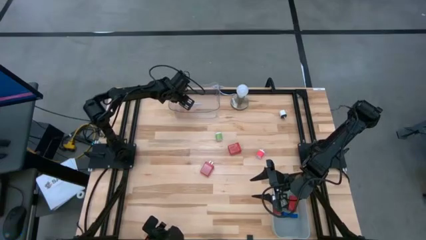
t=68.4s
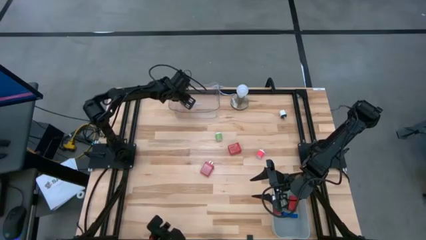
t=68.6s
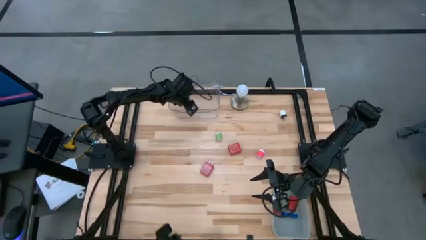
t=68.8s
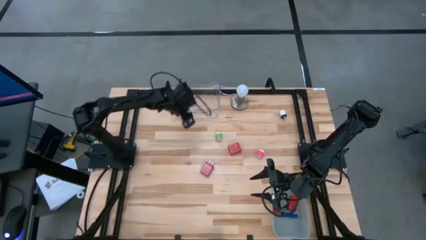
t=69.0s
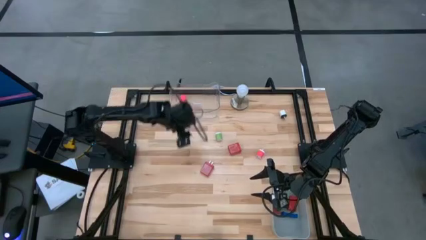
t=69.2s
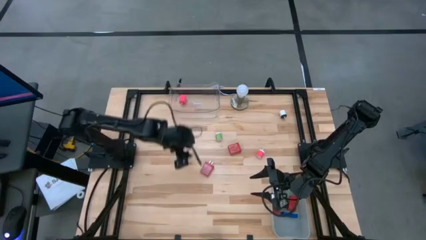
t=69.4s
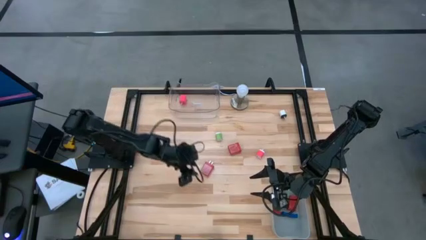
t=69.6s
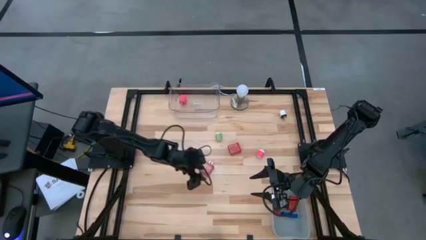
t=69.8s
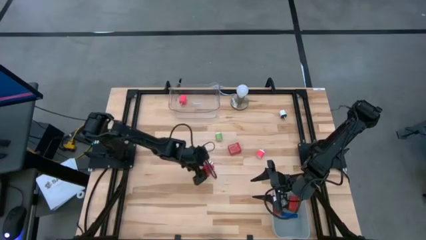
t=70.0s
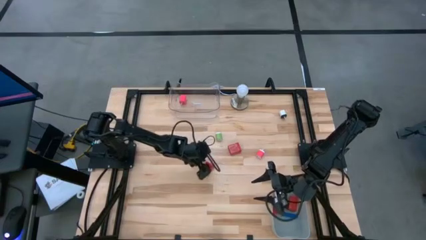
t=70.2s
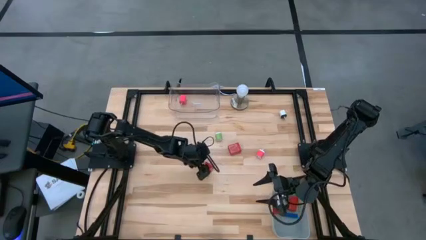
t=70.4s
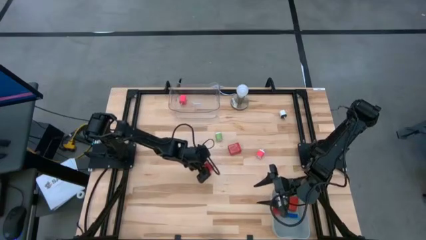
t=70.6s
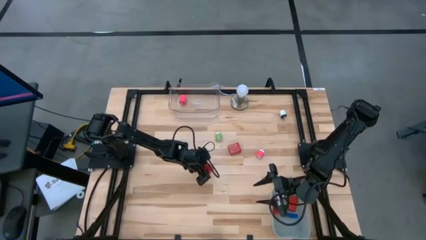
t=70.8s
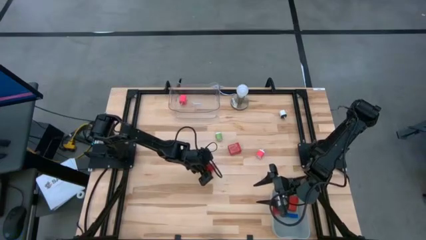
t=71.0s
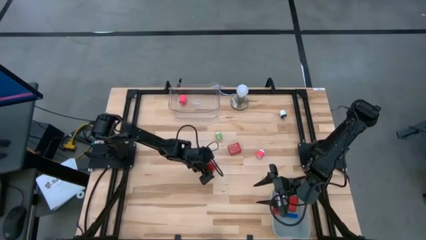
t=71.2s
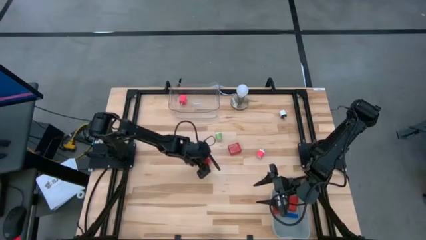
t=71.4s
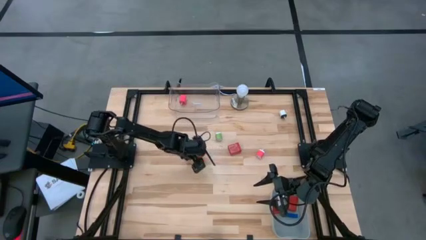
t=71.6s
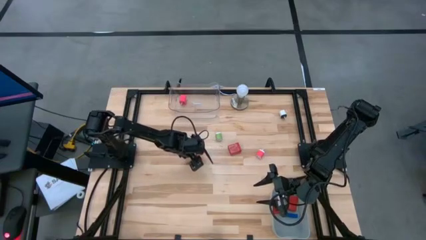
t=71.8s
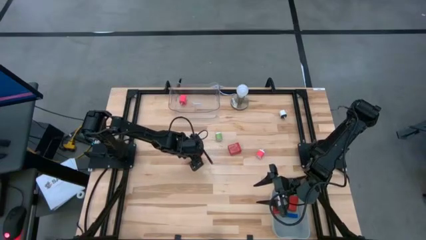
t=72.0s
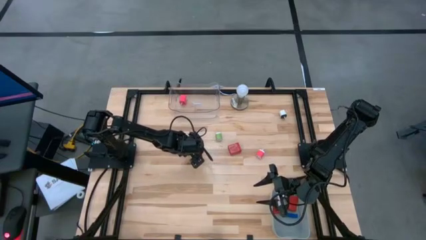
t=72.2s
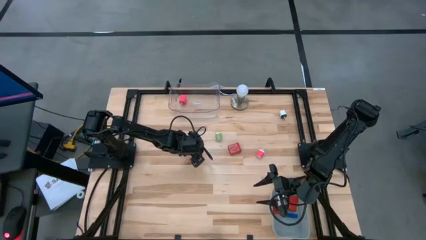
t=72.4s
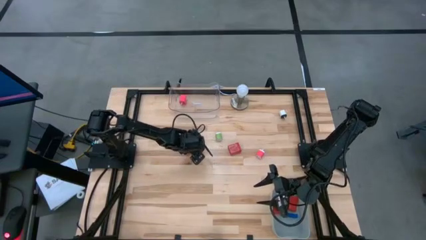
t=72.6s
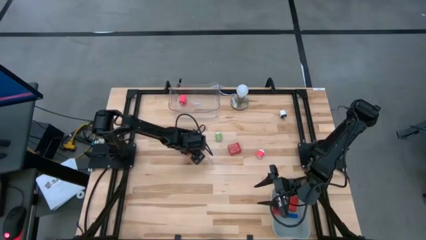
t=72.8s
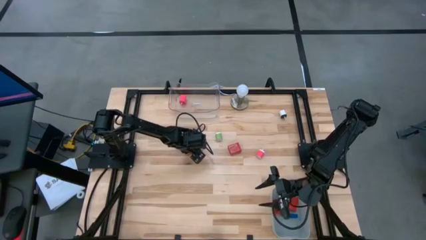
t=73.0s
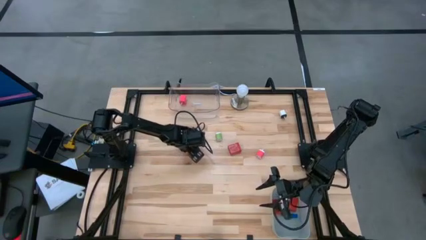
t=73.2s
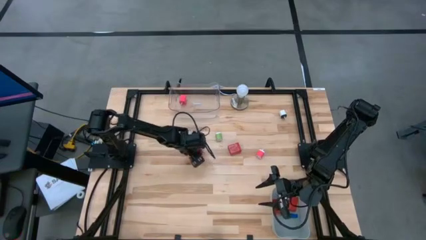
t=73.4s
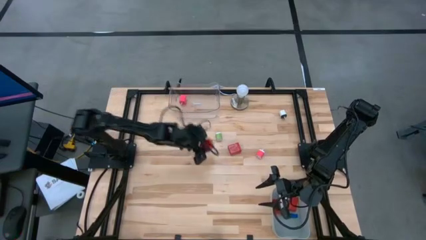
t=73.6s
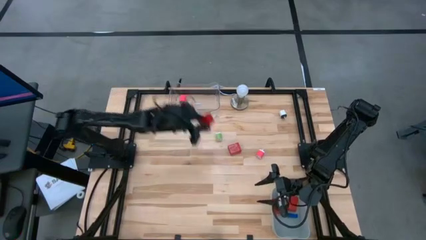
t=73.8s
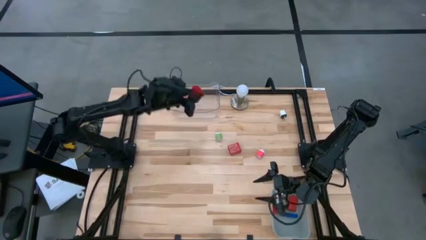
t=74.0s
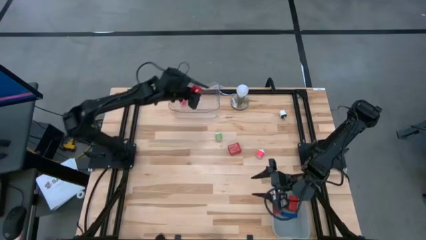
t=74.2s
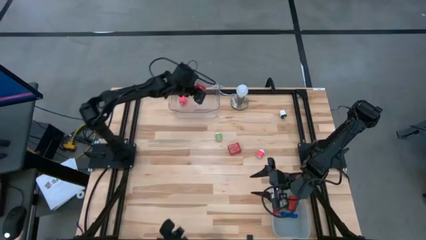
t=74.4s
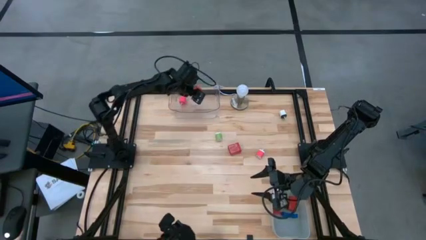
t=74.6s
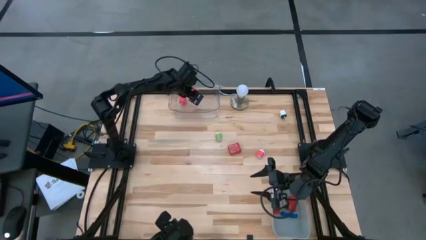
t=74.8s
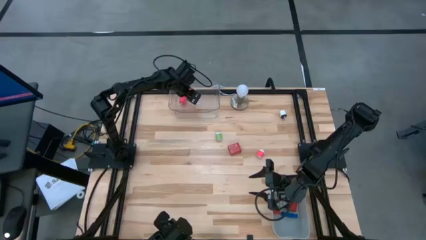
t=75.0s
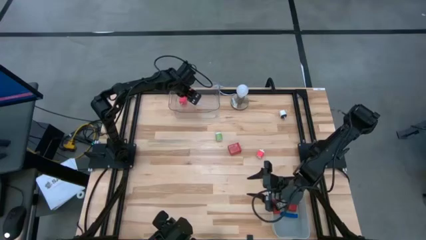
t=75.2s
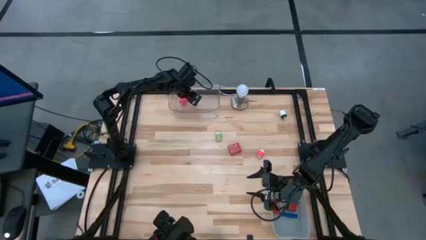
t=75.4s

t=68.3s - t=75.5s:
Task: Pick & Place Office items
Put the bottom red charger adapter into the transparent bin

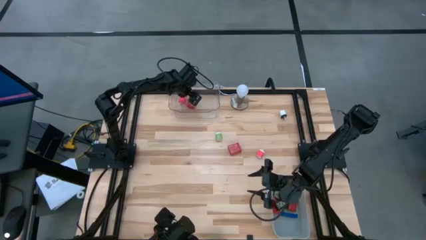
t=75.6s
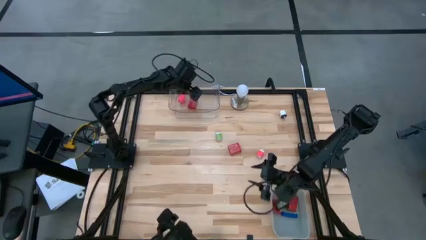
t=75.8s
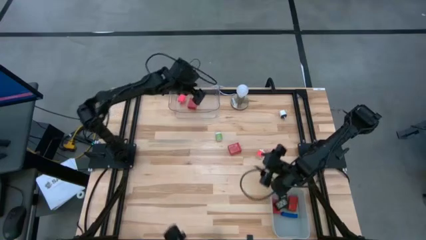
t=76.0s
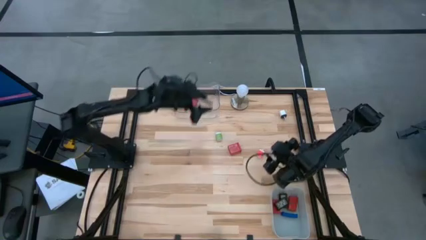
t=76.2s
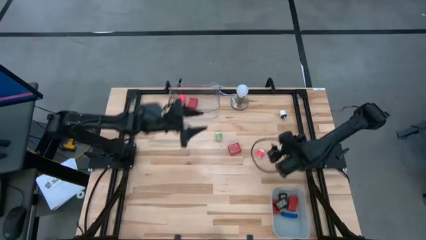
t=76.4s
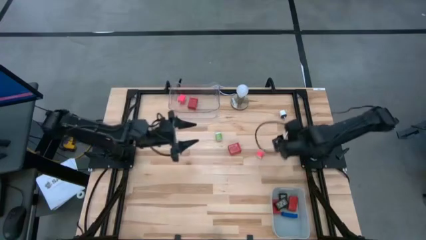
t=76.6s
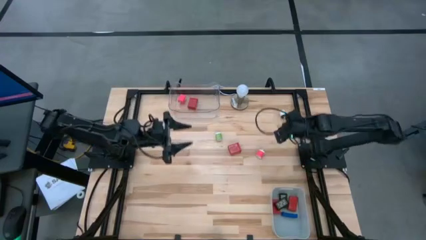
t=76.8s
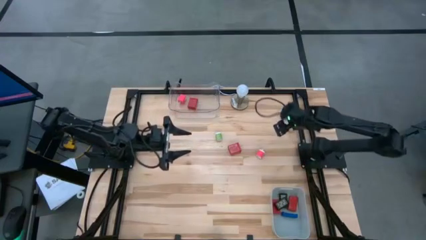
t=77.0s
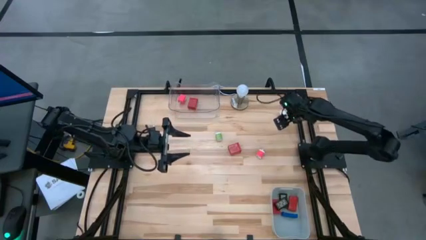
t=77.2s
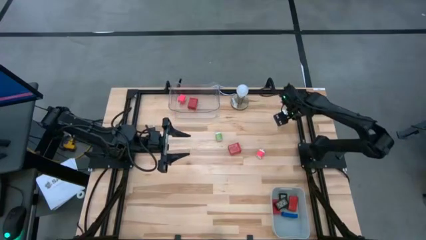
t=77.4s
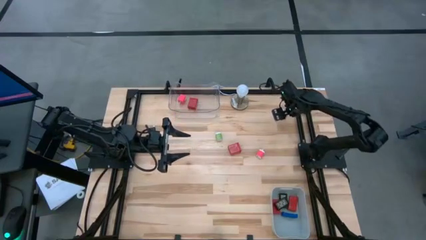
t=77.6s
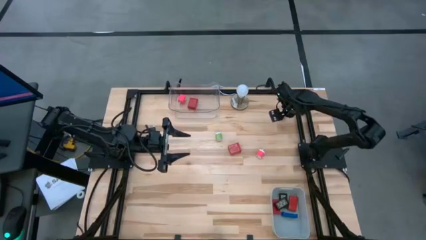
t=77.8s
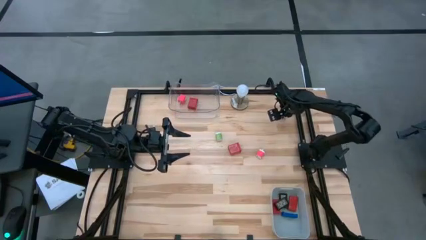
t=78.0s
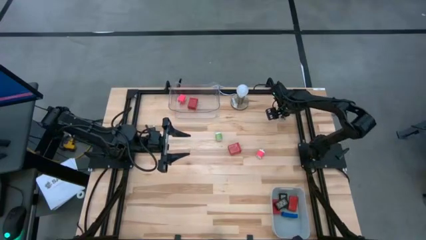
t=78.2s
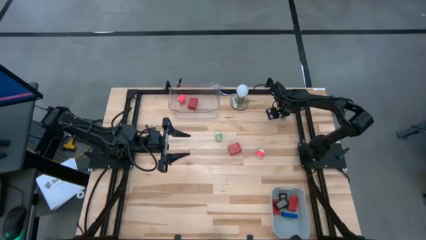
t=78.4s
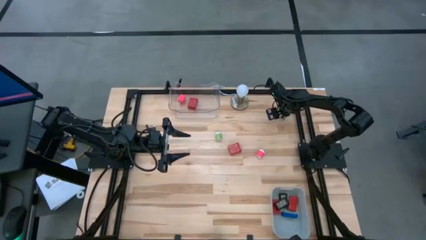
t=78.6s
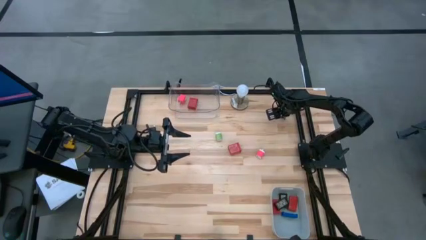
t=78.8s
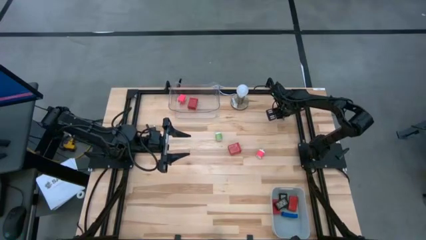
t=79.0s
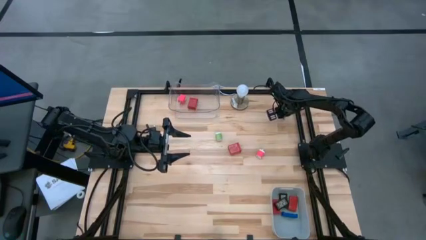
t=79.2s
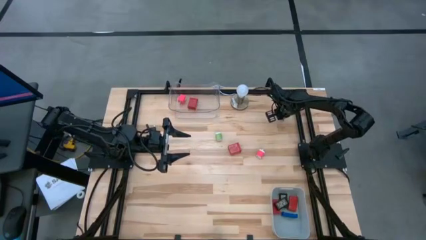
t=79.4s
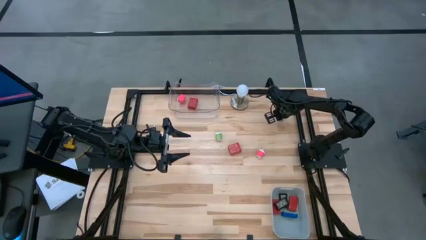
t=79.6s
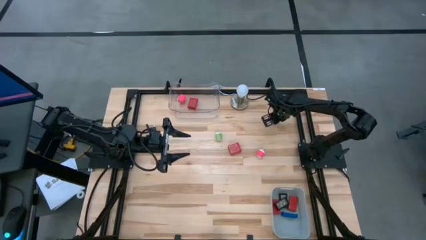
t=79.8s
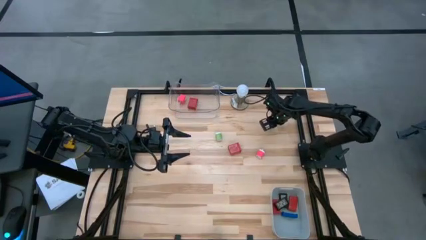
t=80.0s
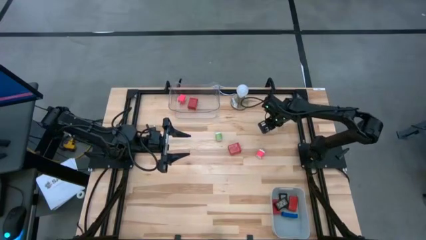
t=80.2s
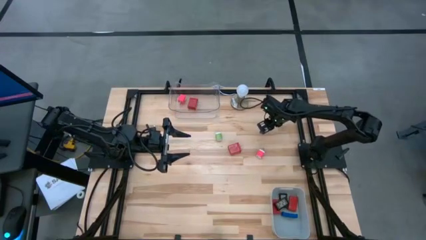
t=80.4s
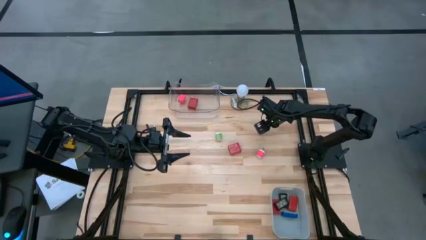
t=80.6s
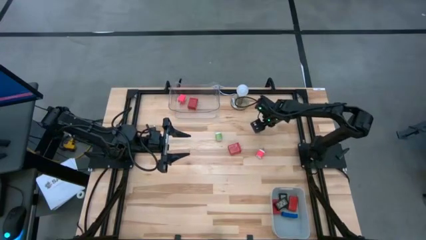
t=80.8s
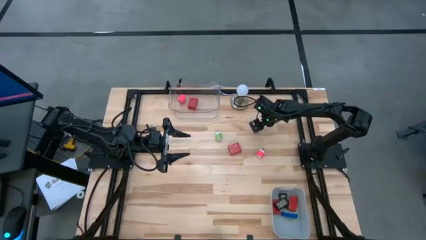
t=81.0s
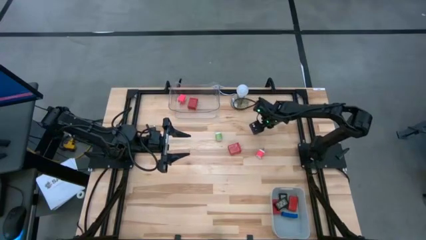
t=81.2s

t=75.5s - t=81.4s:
Put the white black charger adapter into the transparent bin

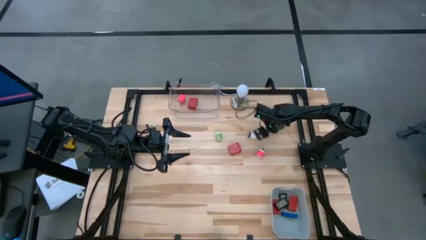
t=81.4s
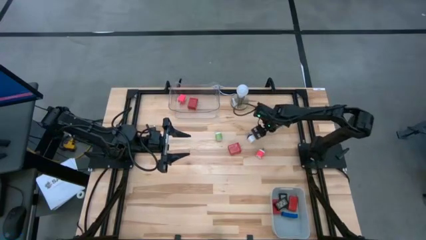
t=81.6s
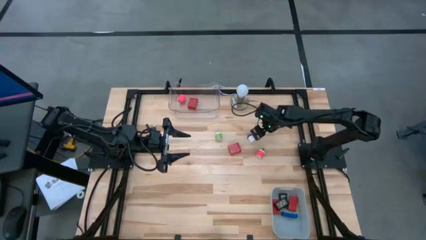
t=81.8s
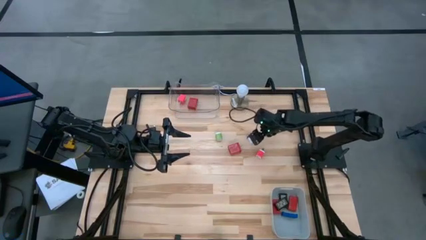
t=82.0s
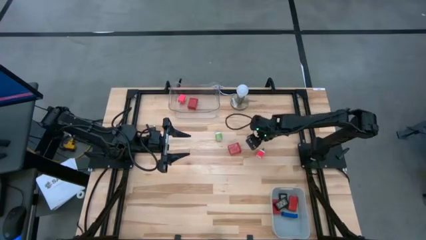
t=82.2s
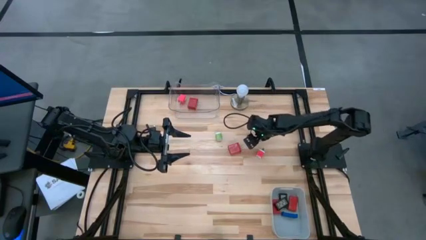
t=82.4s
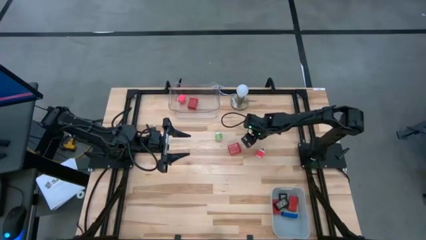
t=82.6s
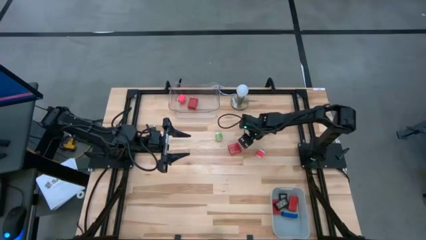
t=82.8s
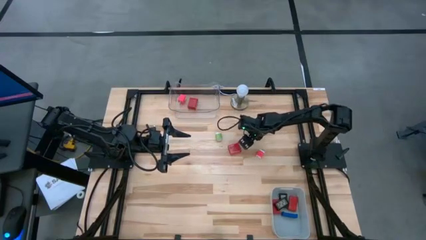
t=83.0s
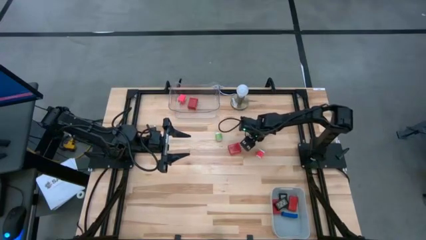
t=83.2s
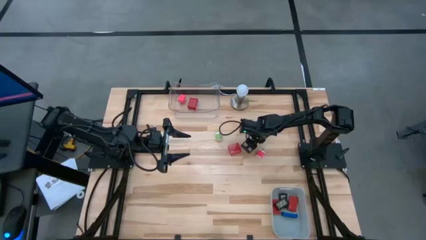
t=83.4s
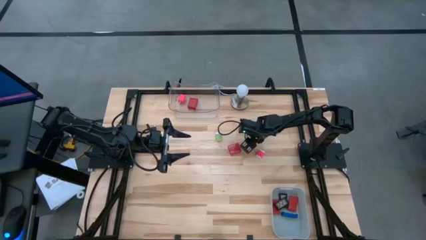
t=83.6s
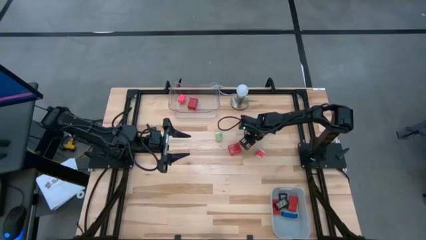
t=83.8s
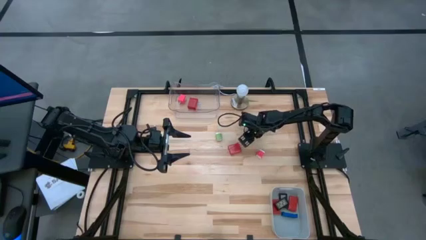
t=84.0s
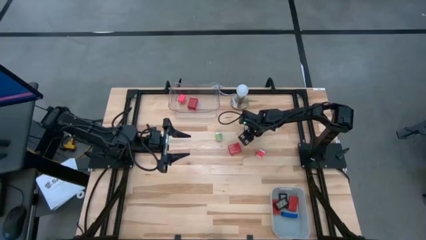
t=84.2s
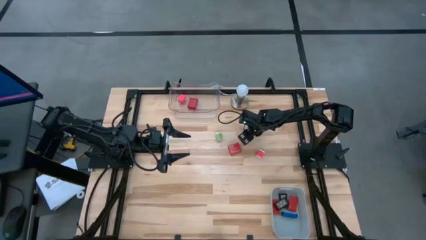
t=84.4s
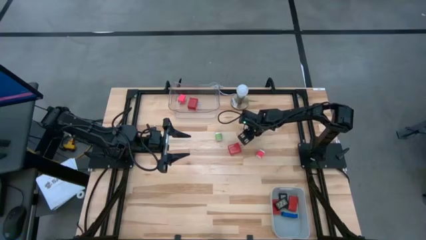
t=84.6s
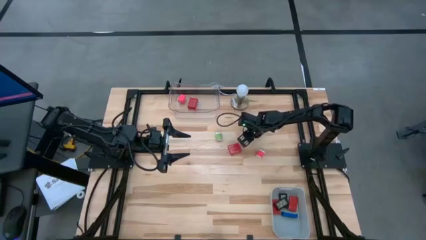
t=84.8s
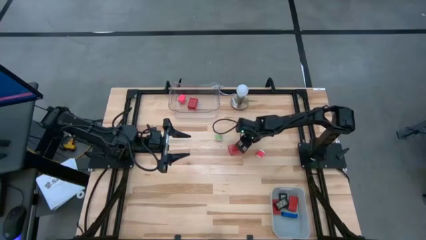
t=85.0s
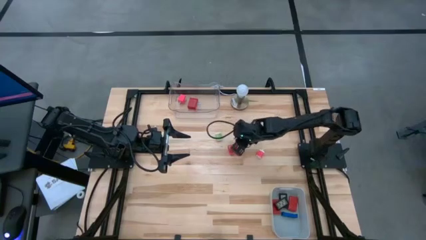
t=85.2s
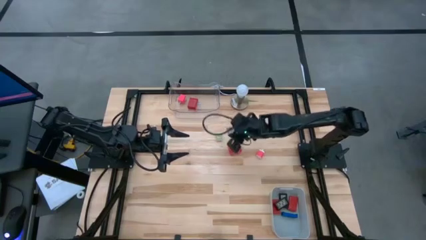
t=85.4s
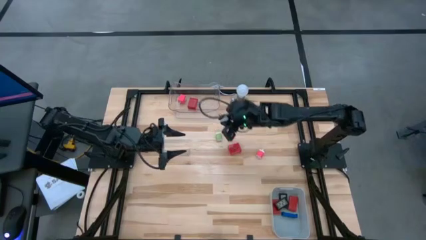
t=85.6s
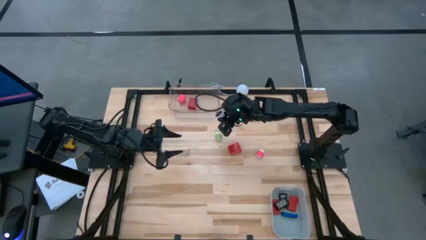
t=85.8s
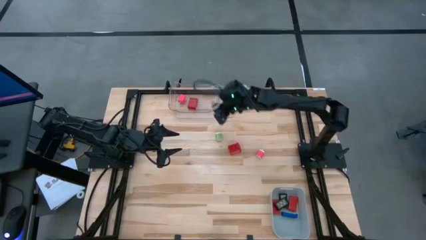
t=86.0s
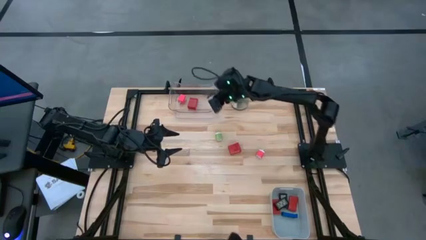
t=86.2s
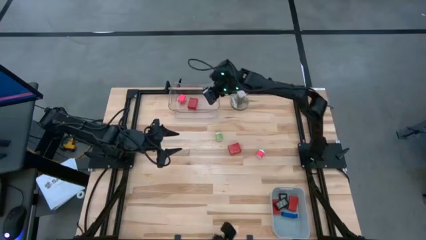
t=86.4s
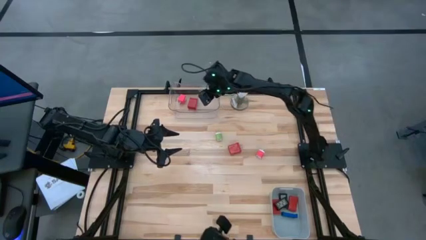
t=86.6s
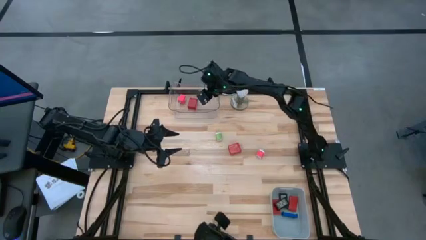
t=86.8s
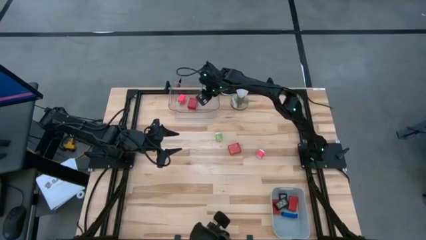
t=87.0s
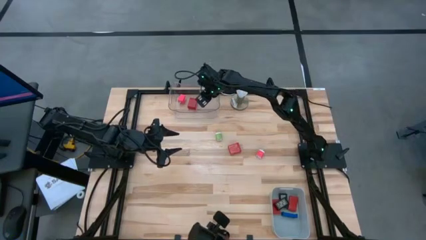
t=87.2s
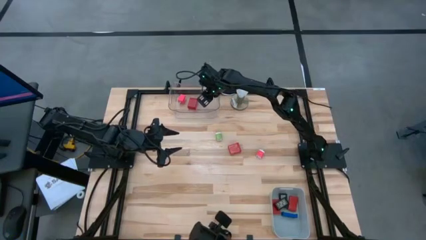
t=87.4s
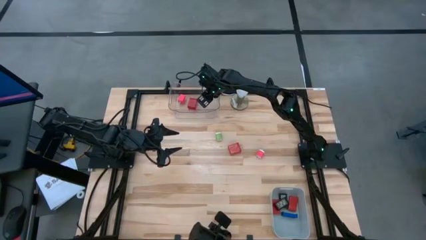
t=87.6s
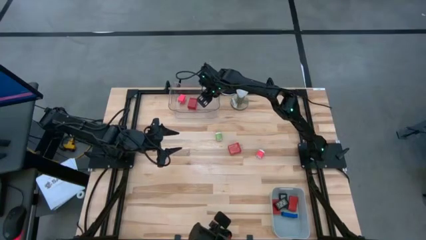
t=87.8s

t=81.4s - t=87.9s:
Put the white black charger adapter into the transparent bin
